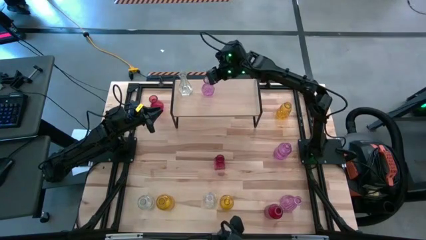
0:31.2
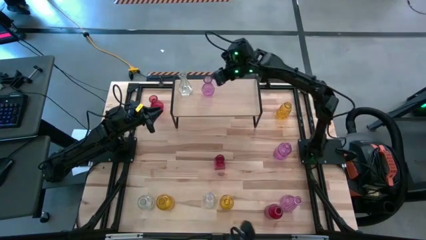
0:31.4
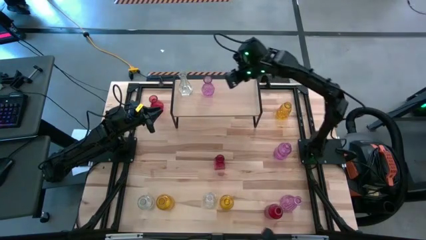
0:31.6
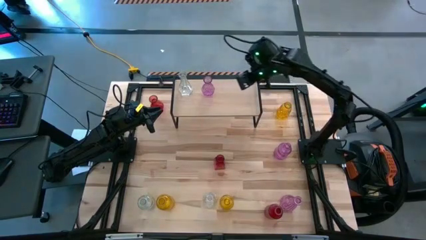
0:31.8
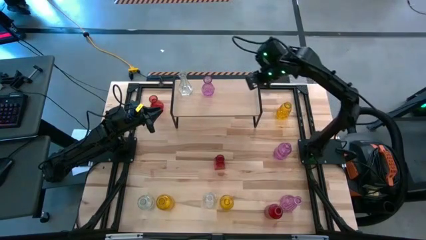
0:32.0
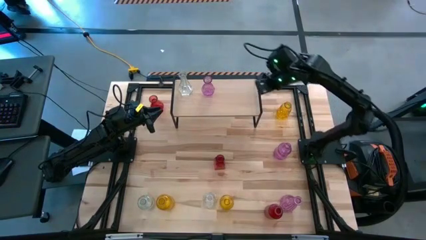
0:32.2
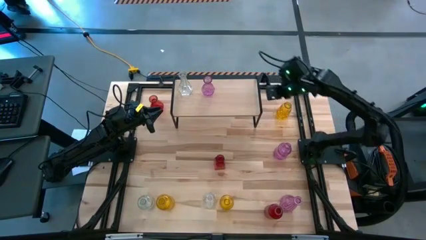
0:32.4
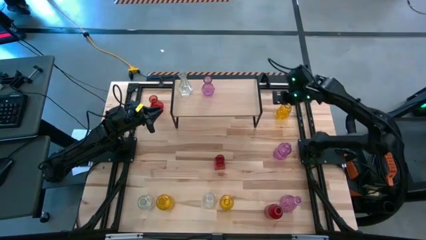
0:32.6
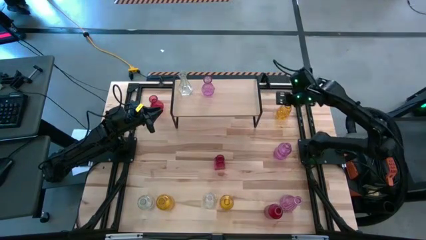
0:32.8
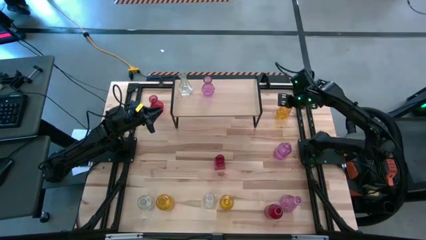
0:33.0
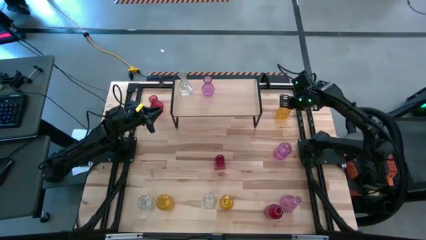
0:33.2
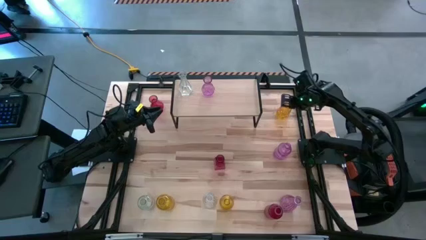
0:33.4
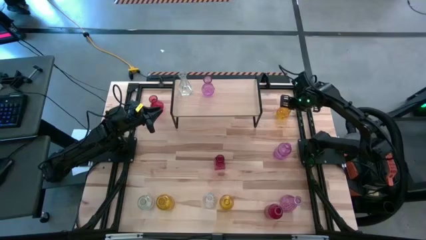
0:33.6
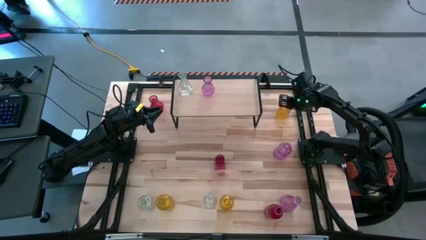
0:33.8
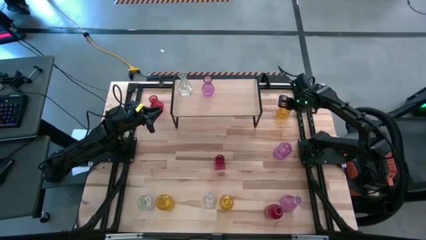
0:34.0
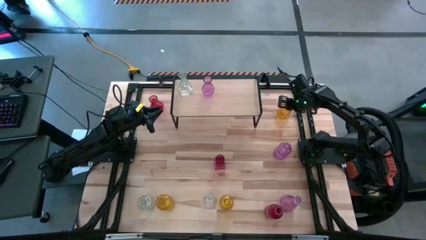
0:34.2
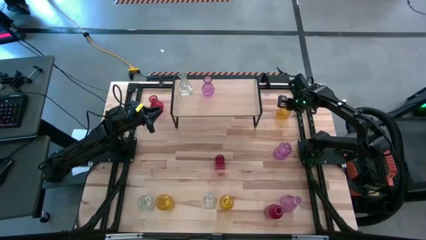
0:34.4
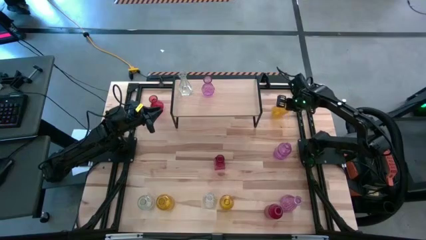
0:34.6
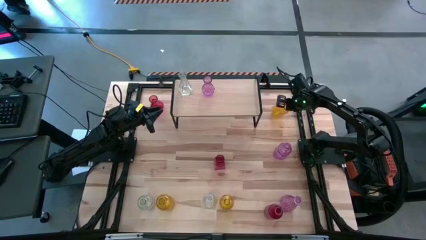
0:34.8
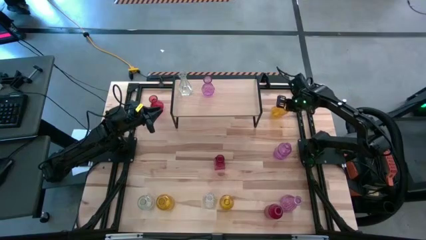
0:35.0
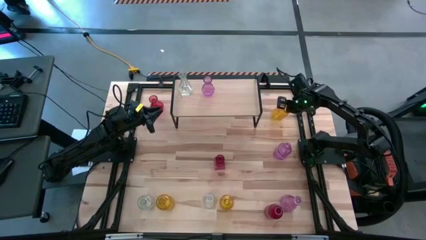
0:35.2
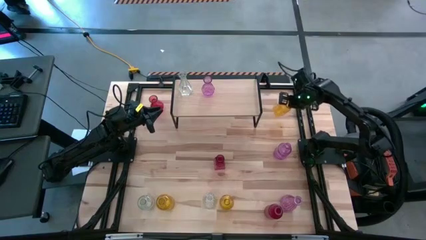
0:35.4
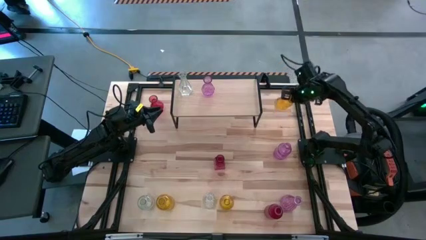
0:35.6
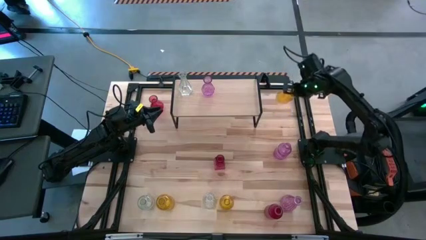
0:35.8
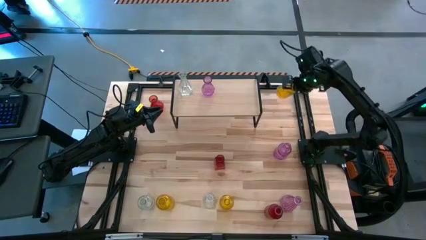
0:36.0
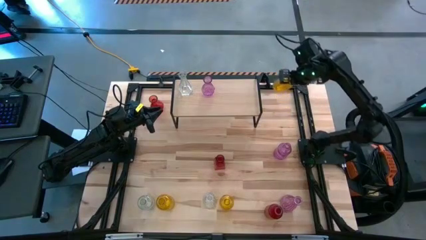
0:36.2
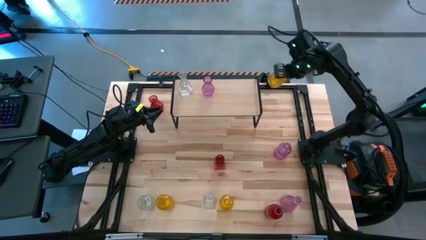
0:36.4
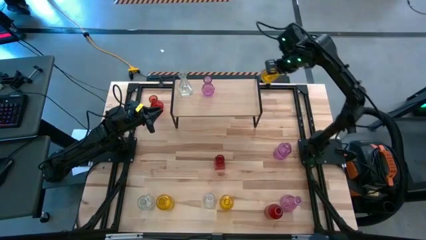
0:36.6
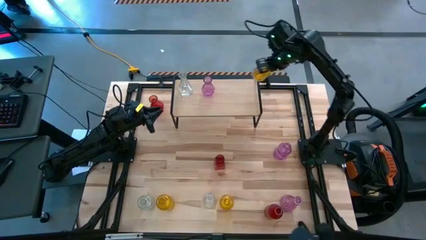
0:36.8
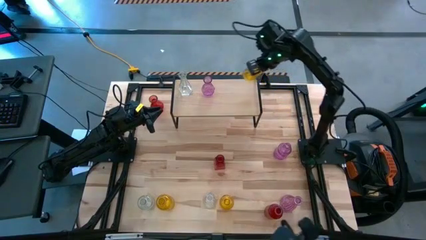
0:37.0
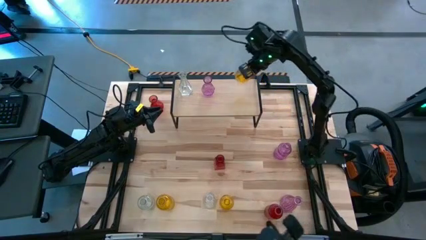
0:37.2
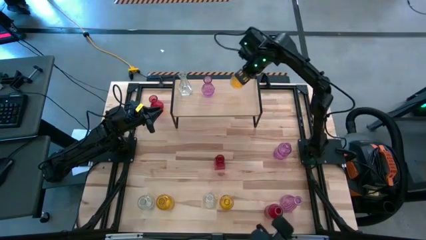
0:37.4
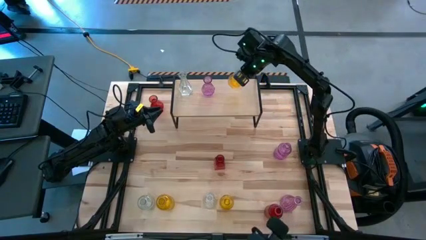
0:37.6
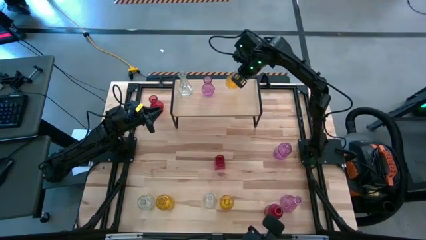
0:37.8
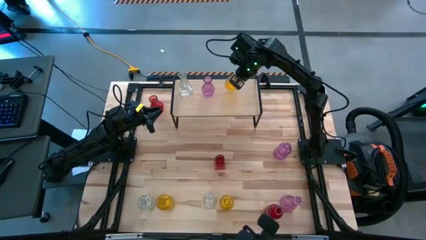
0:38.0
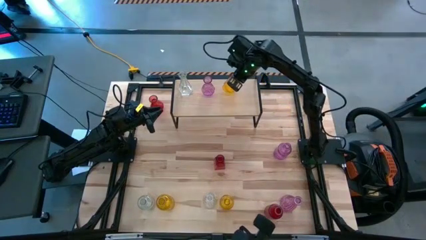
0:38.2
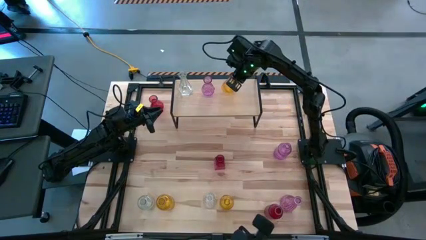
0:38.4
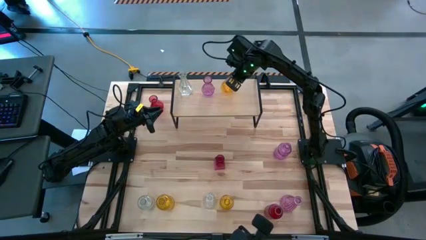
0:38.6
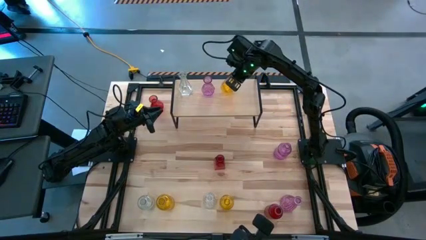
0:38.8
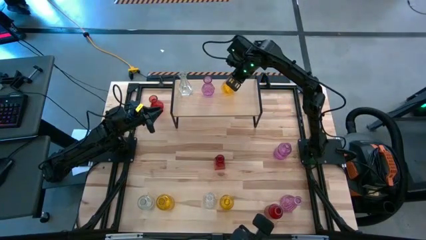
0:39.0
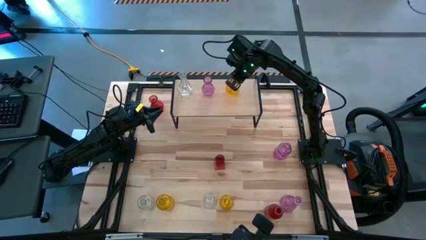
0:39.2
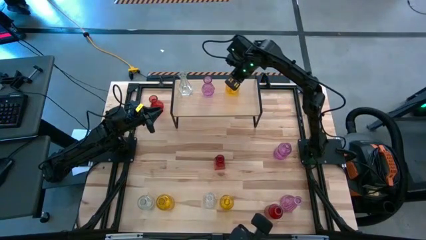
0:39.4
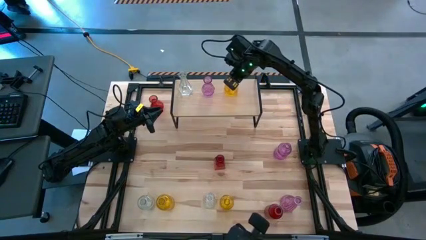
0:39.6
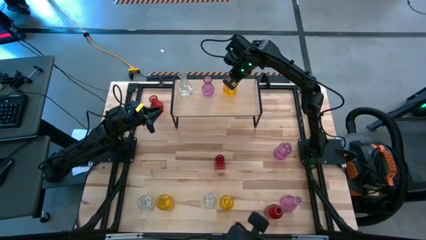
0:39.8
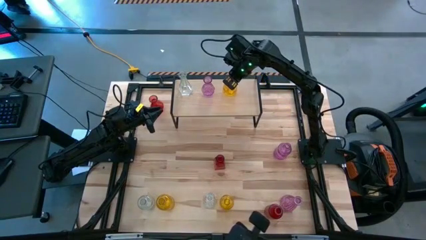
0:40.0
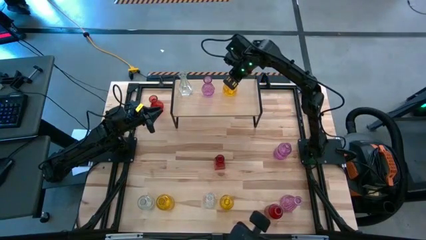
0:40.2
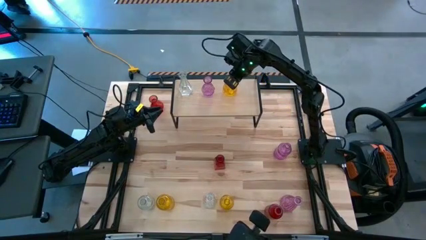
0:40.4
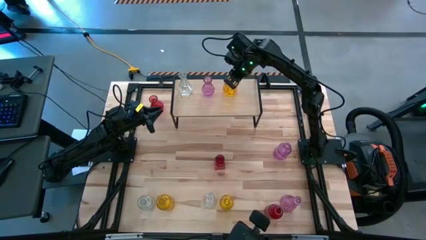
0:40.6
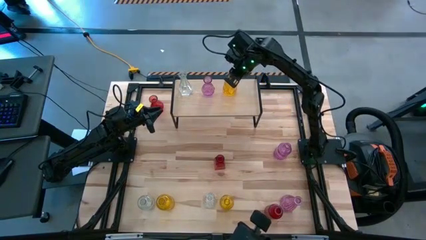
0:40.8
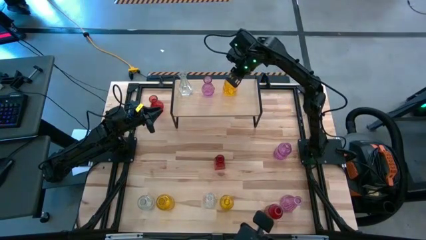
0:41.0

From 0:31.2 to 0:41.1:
Task: sort vases onto shelf
Put the top yellow vase on the shelf

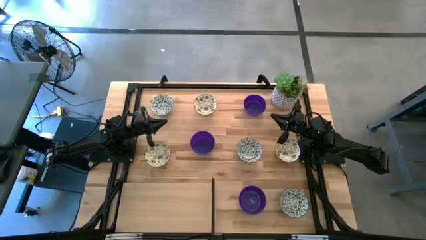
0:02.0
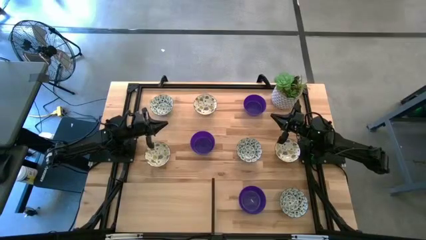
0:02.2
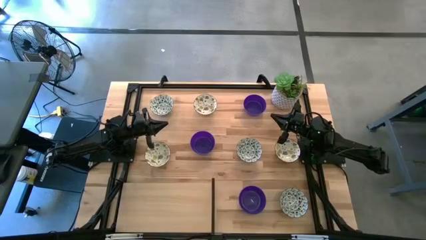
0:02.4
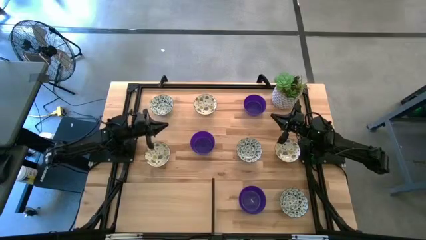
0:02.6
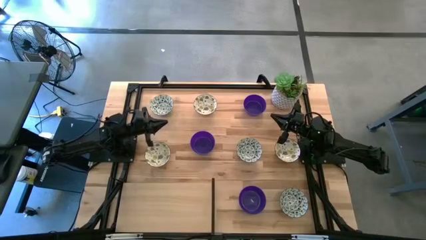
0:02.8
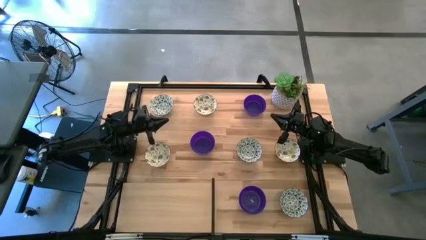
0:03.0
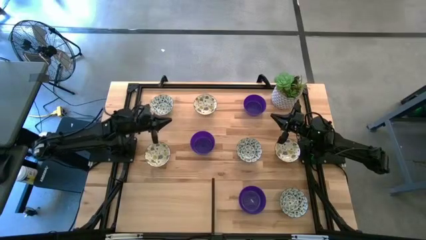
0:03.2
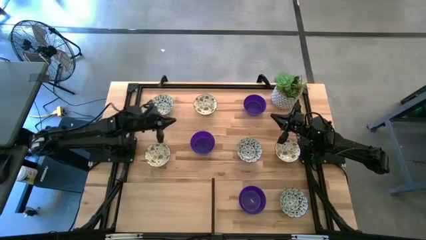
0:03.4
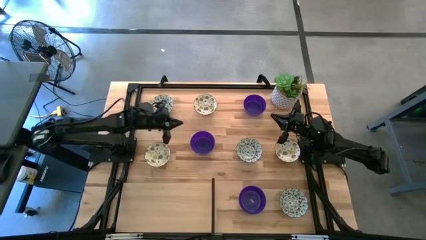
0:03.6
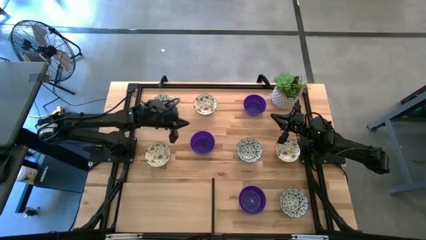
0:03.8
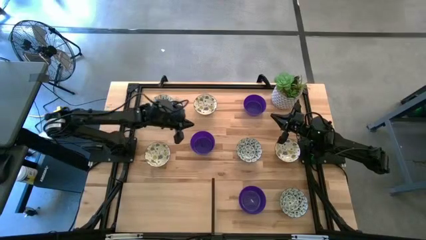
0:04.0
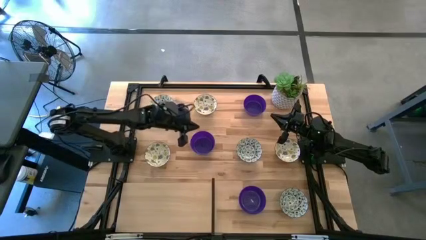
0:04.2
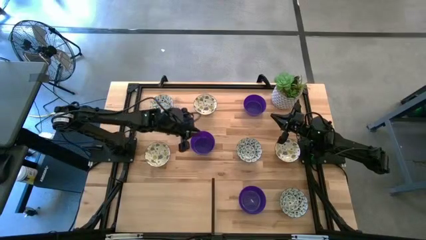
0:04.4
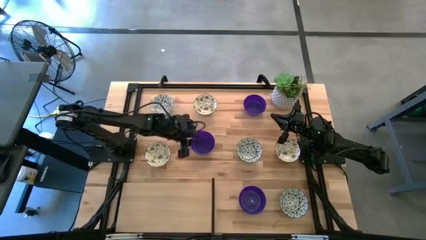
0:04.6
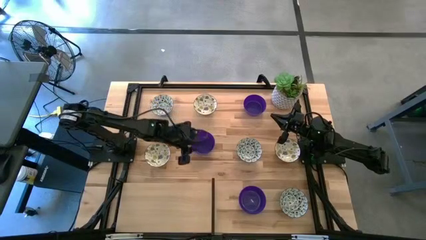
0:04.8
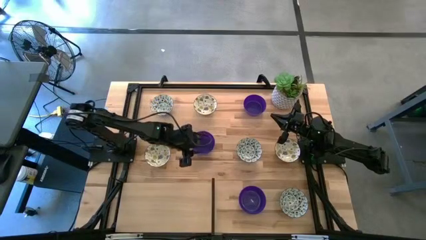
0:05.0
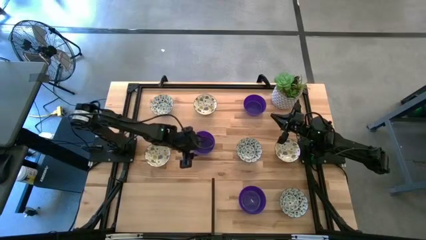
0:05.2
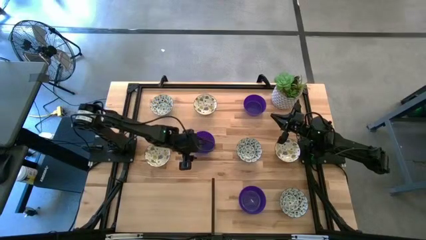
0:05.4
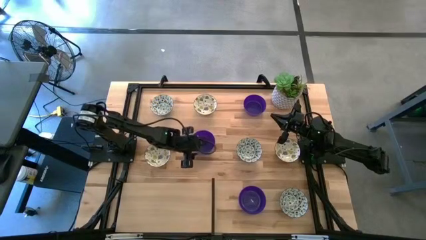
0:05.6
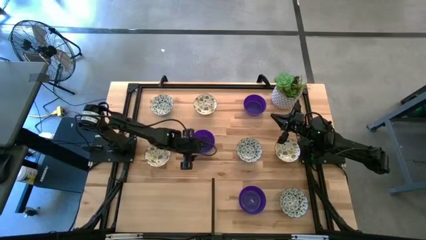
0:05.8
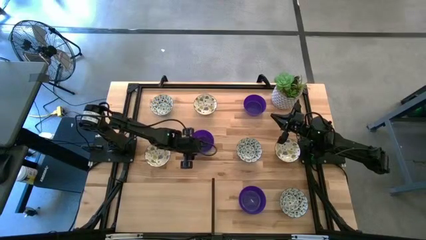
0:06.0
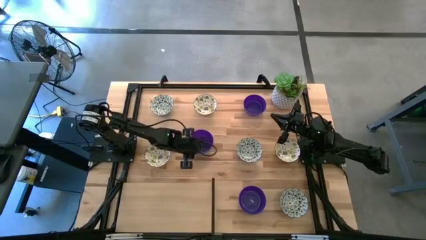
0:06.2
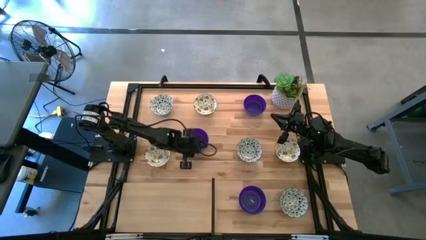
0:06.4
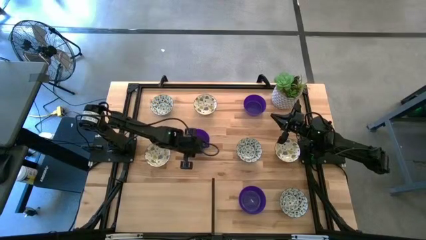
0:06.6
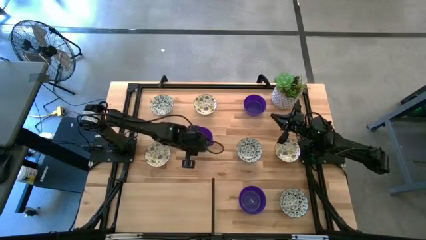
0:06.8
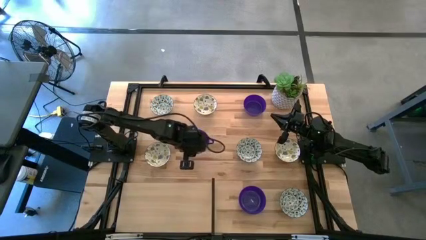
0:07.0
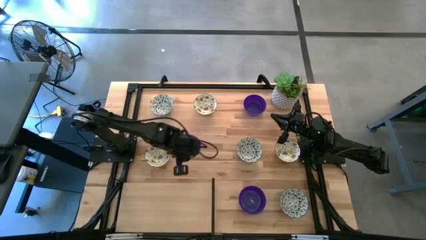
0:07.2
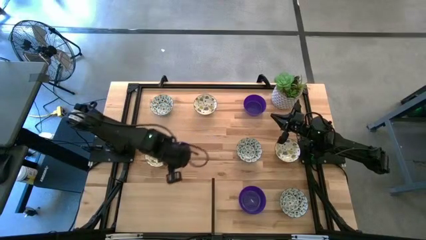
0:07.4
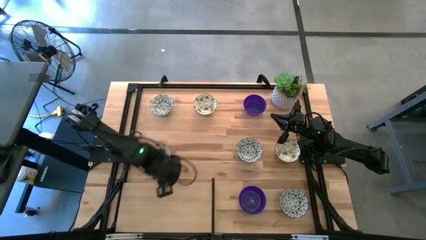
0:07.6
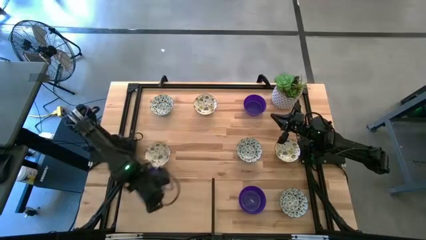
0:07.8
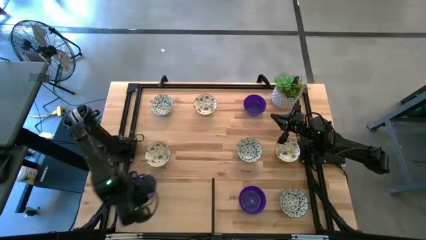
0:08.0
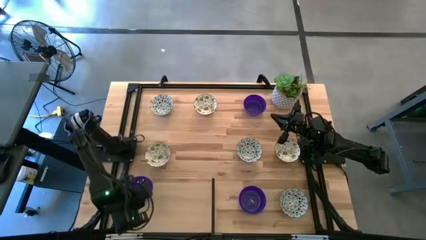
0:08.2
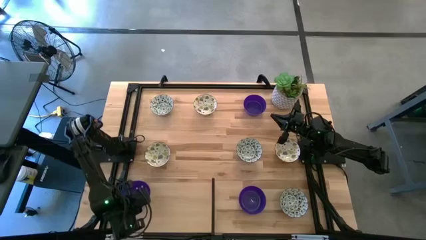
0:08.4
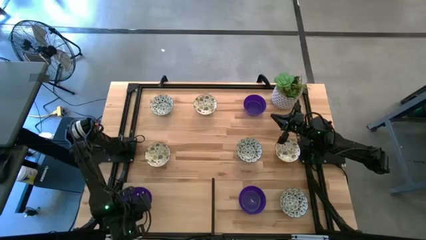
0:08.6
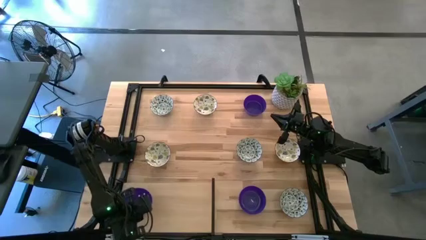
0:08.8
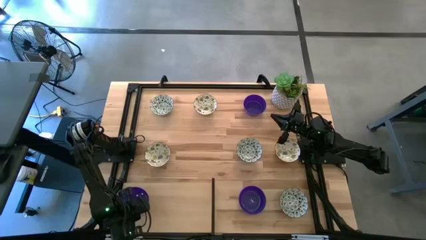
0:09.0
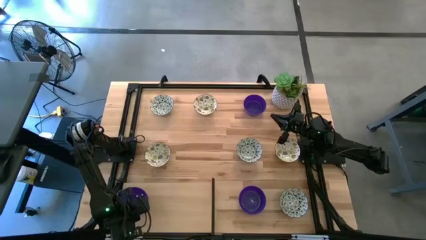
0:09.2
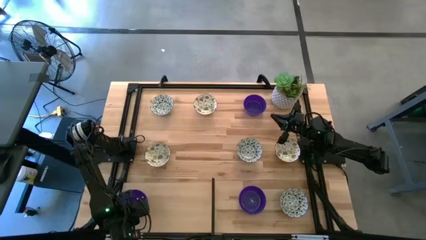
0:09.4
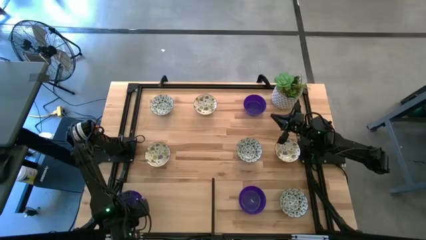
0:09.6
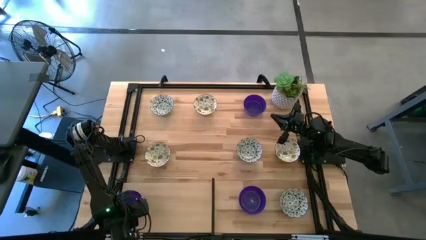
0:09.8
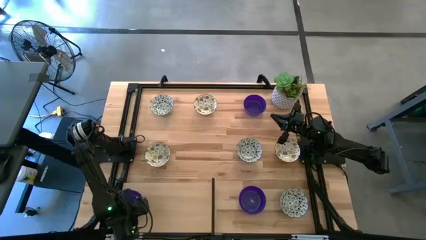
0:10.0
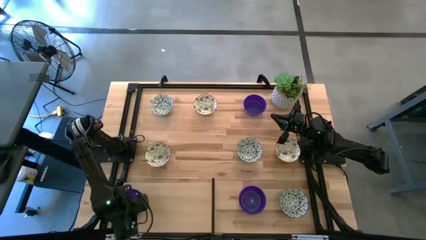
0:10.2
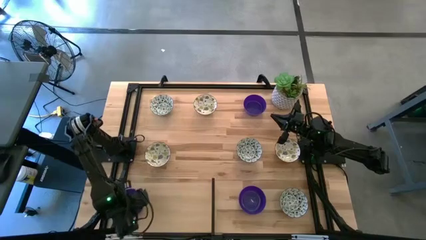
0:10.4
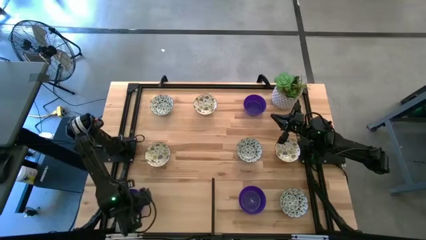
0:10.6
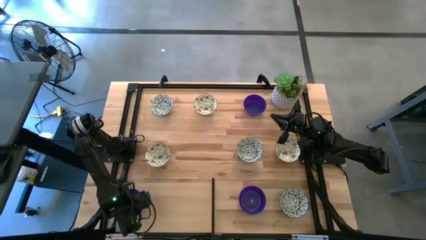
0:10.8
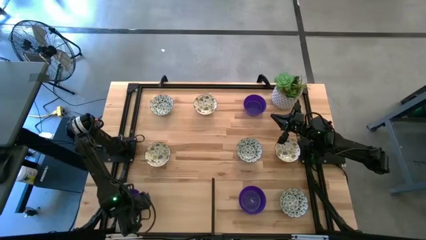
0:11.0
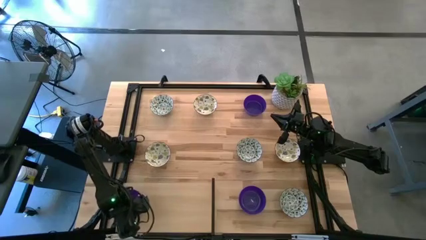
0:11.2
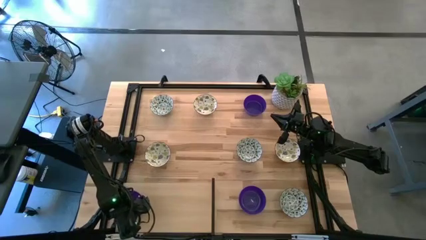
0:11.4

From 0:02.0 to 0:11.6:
Task: Pick & Place Mini bowls
Put the middle violet bowl on the shelf
